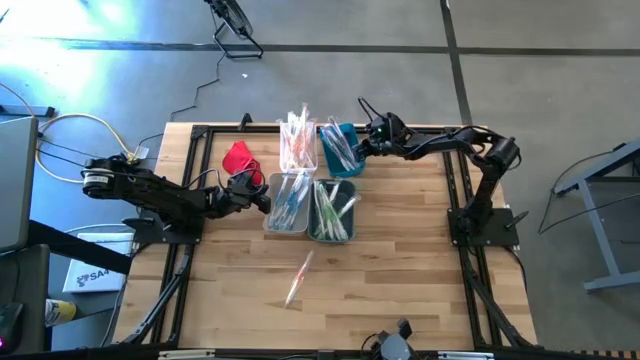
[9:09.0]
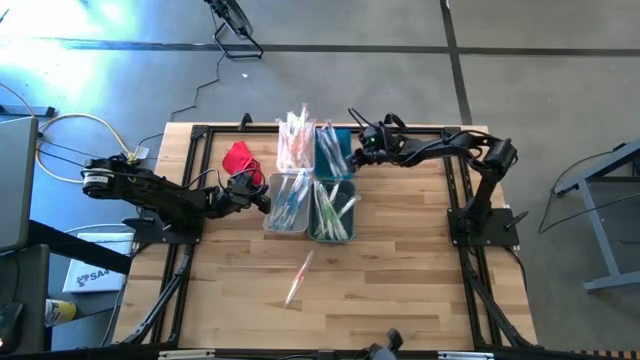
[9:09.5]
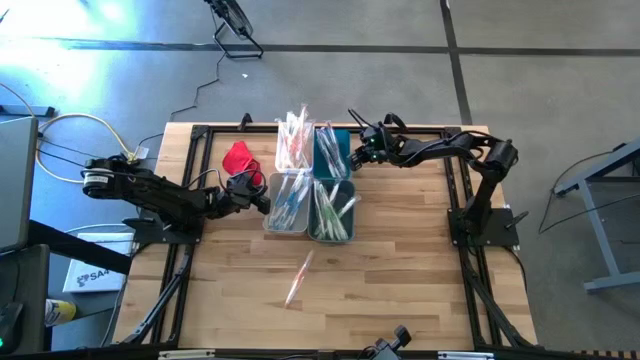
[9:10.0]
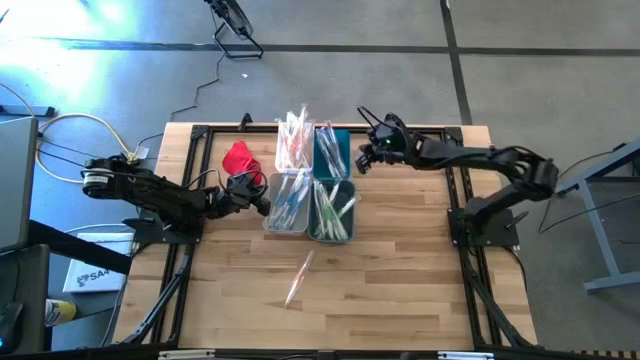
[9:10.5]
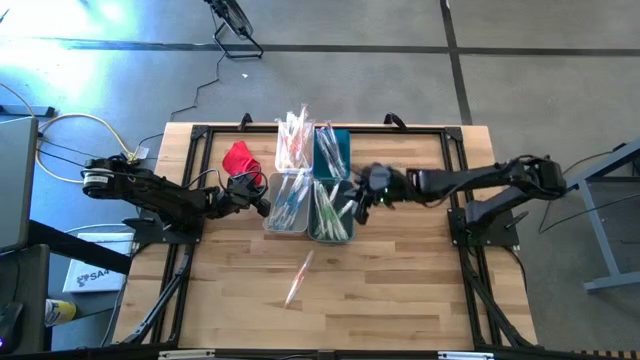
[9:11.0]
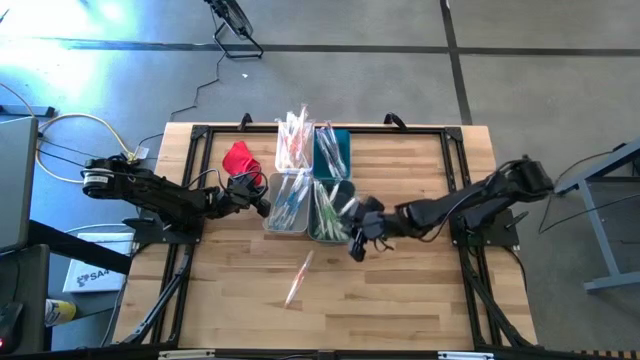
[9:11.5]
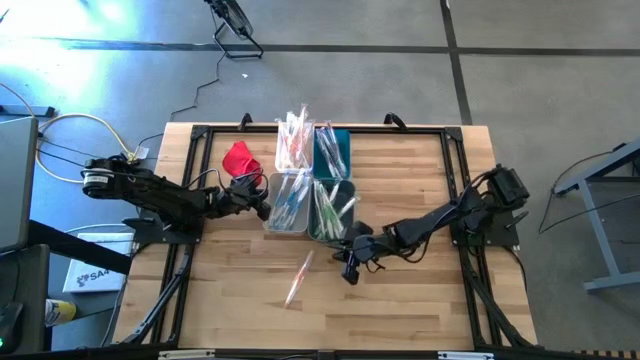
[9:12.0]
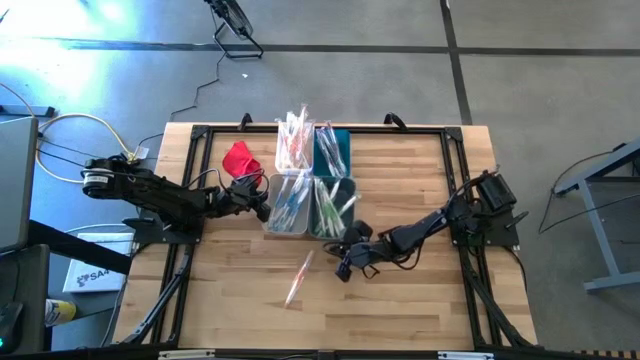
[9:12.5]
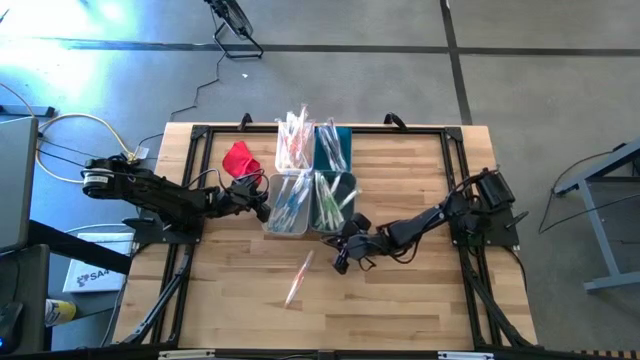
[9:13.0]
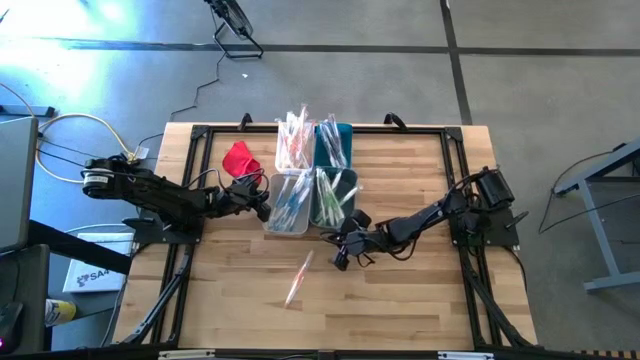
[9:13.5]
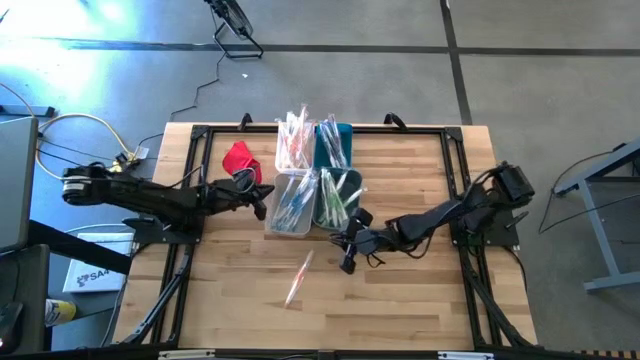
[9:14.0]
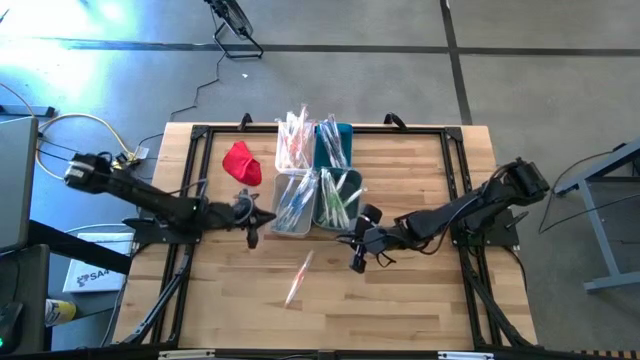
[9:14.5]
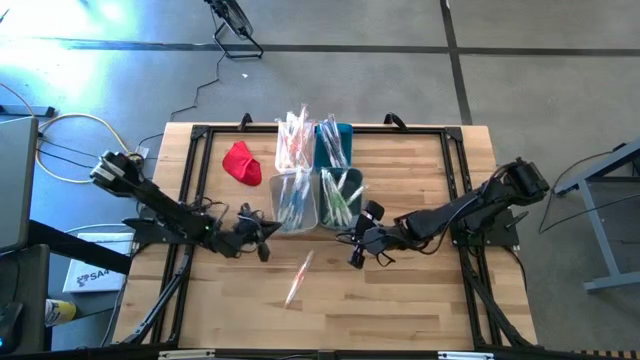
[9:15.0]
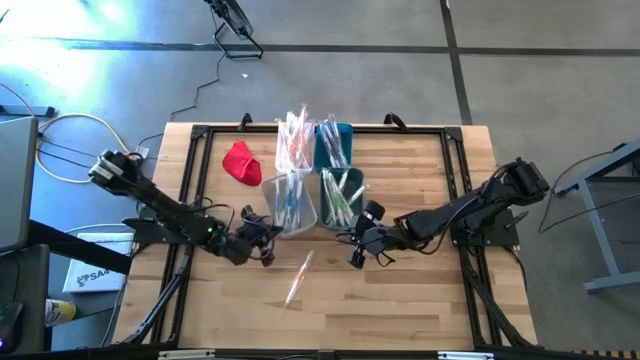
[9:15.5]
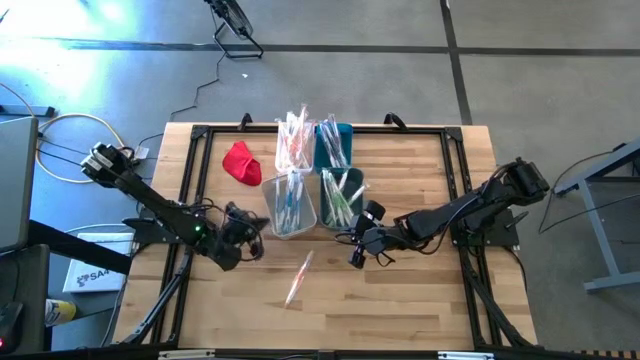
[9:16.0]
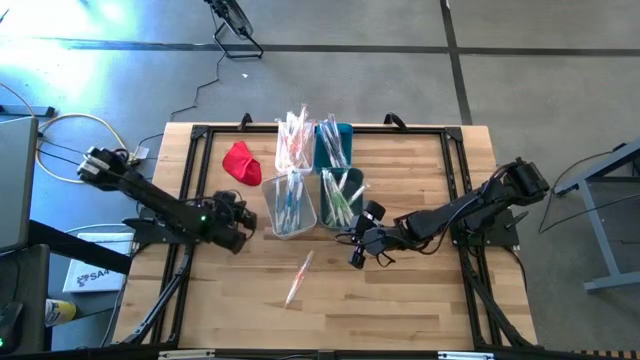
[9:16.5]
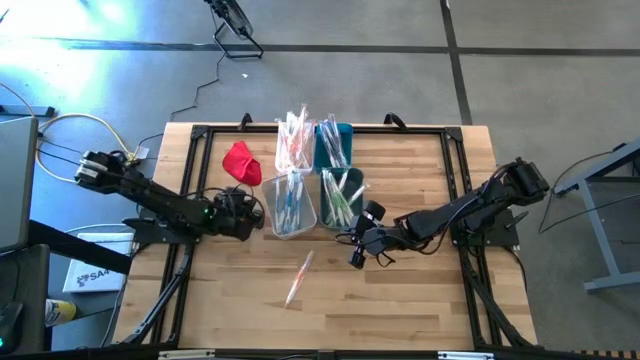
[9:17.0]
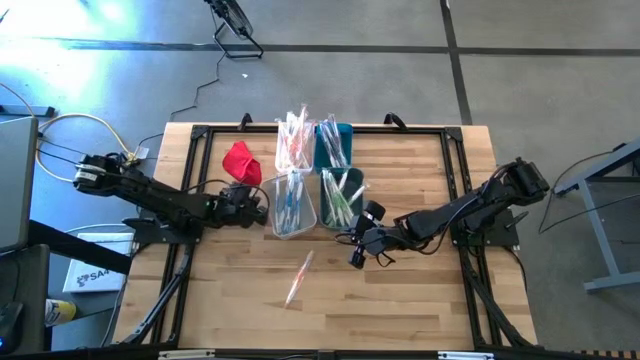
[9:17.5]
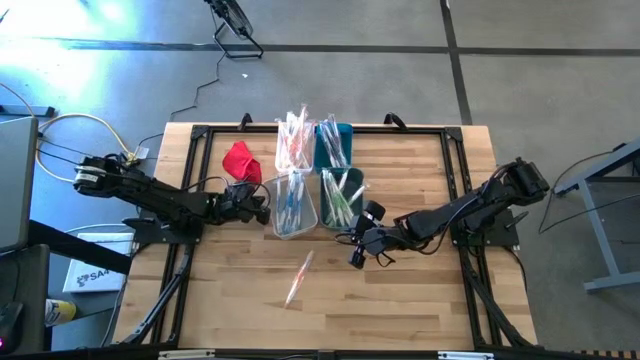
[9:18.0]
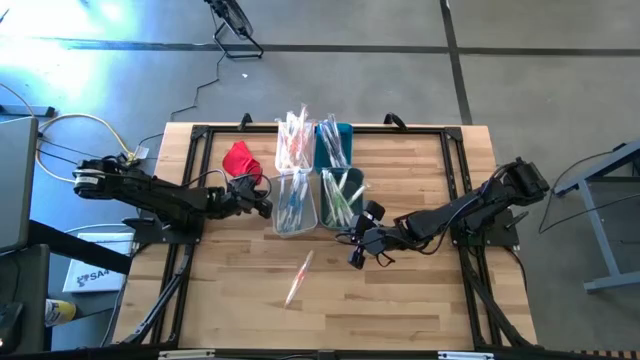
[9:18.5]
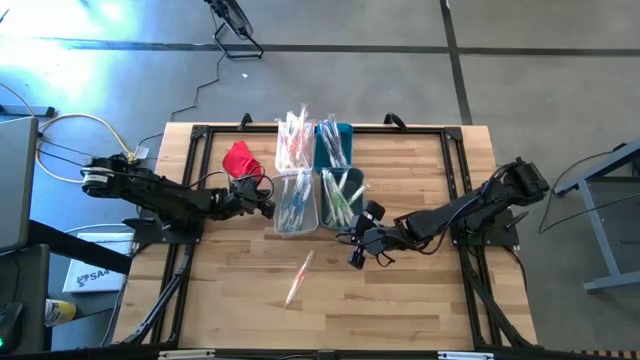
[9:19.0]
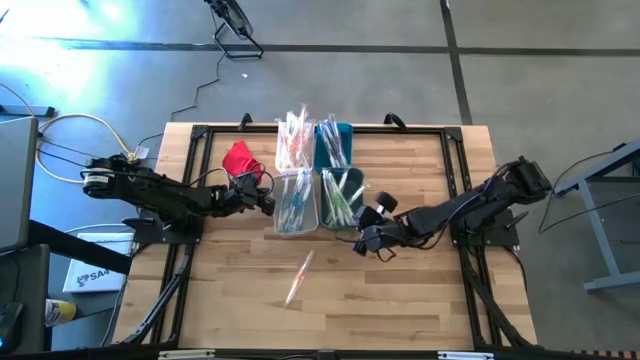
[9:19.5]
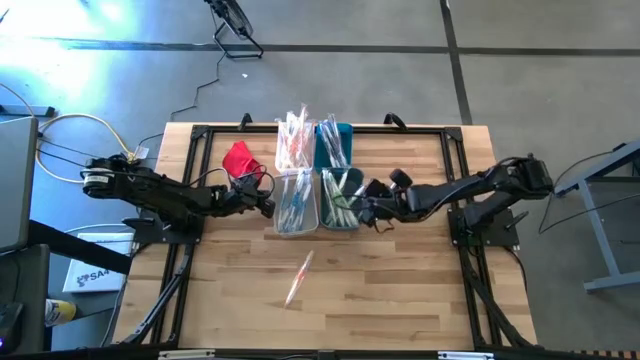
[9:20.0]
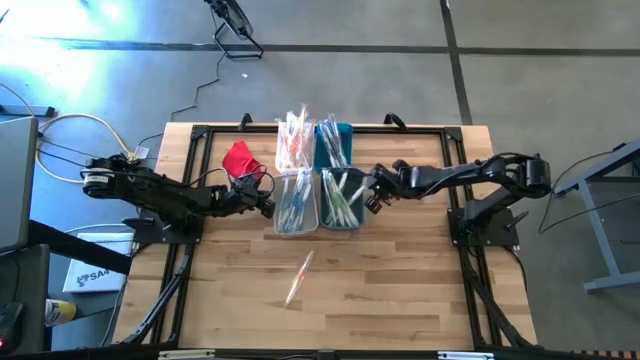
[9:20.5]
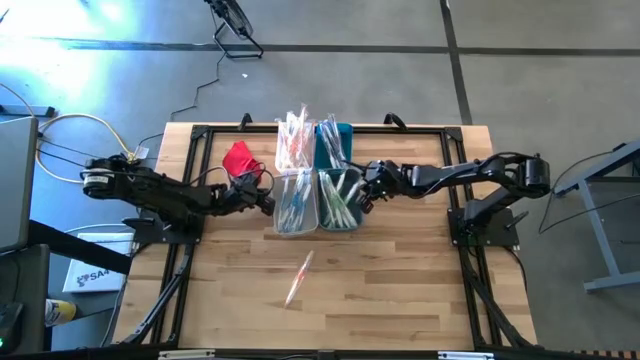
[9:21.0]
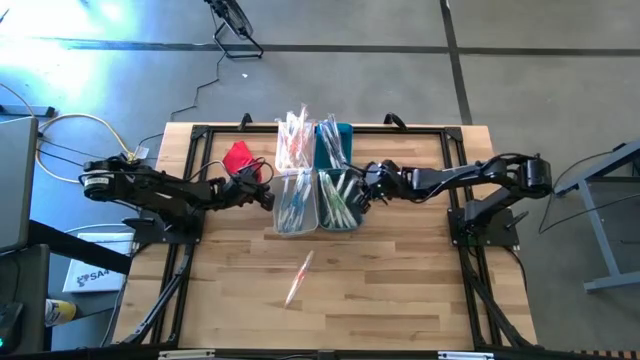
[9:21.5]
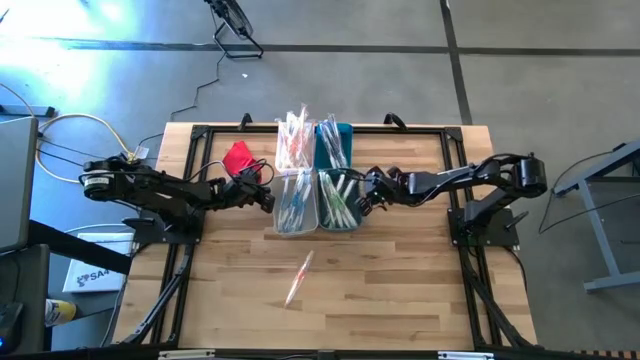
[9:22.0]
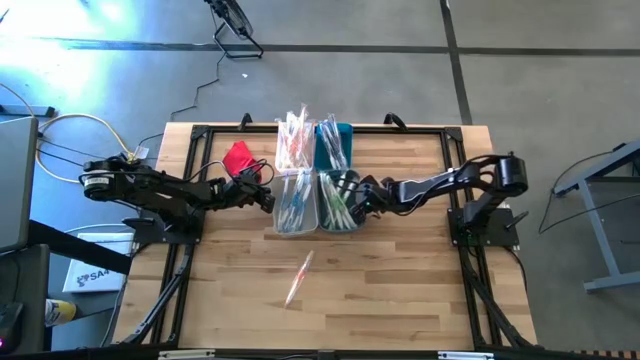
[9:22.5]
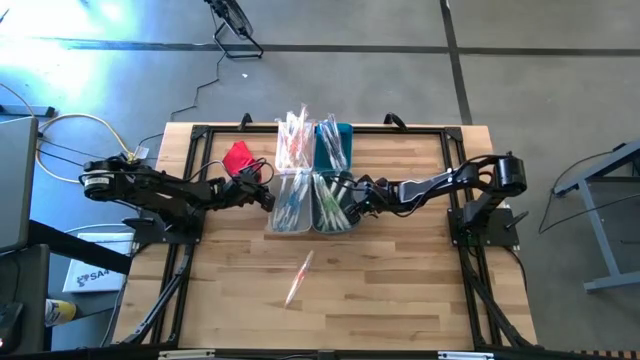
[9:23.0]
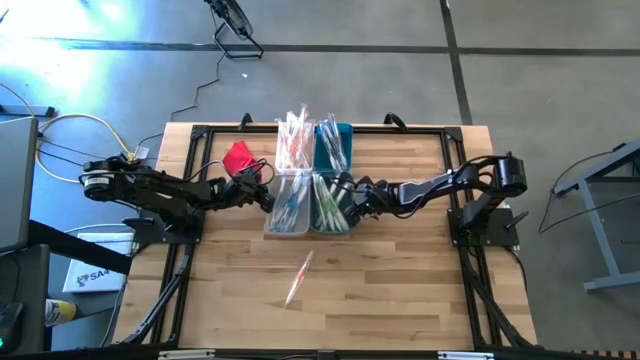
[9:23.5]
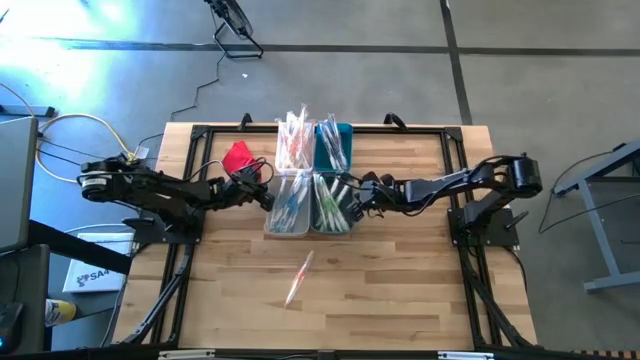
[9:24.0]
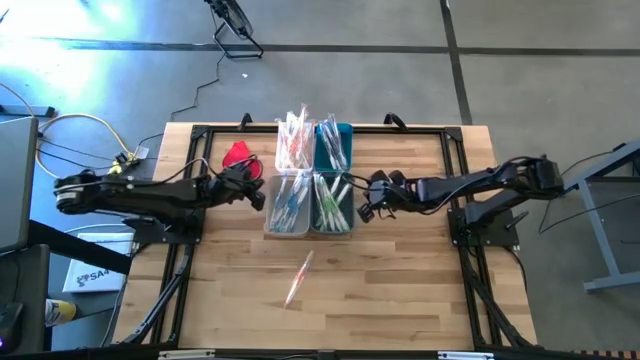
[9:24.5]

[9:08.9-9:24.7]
Task: Pick & Place Toothbrushes
Adjust the bins
